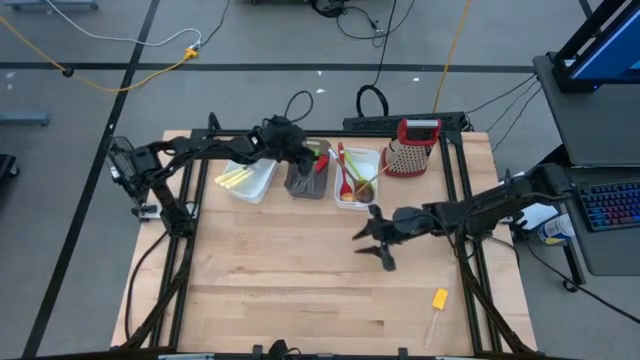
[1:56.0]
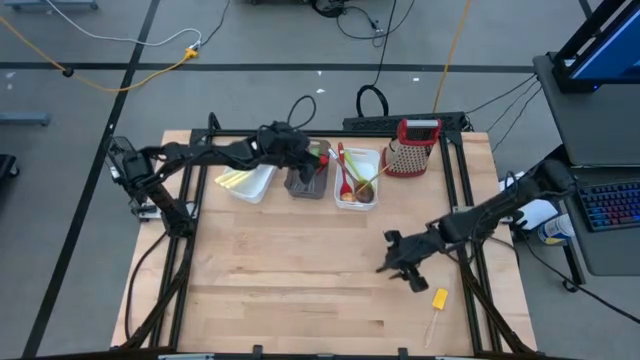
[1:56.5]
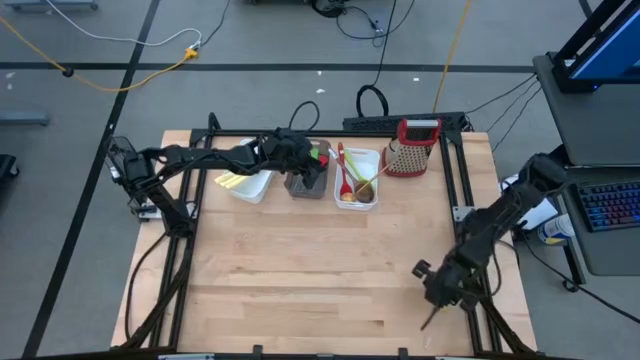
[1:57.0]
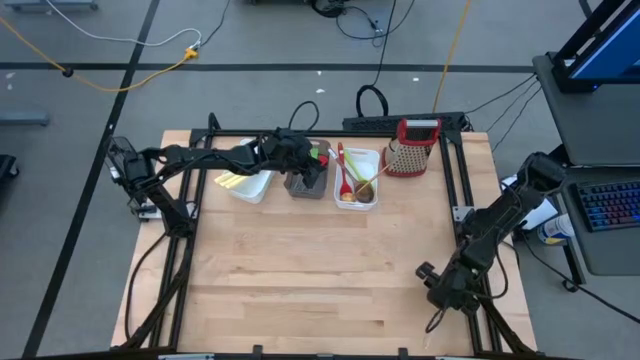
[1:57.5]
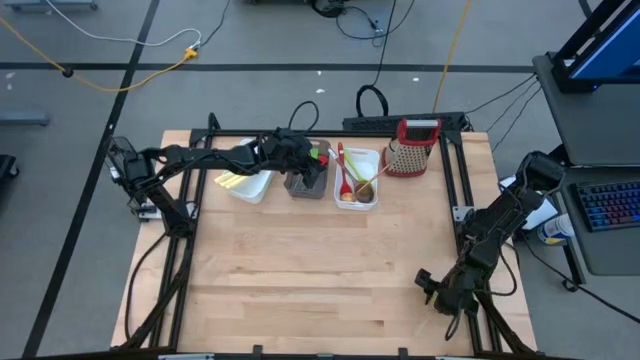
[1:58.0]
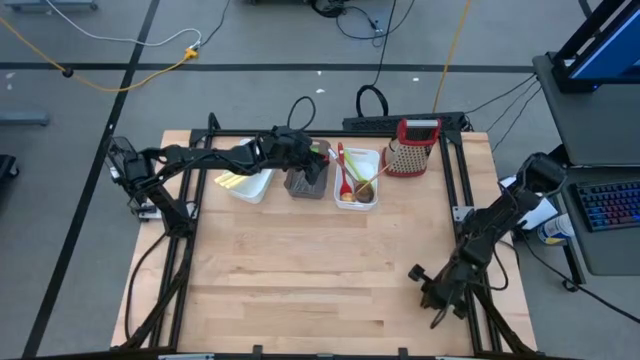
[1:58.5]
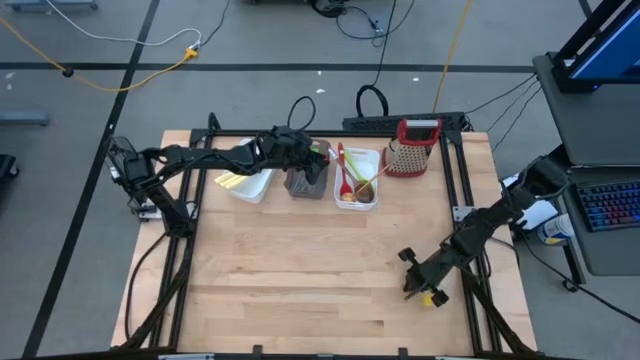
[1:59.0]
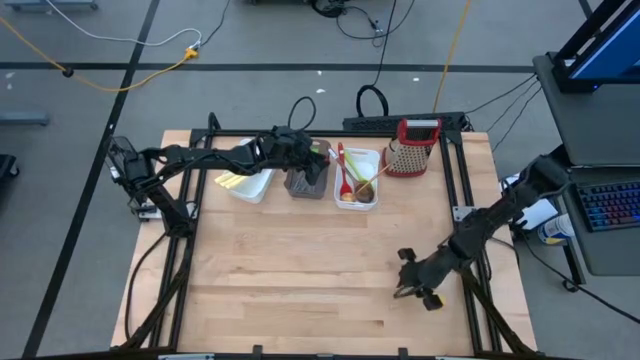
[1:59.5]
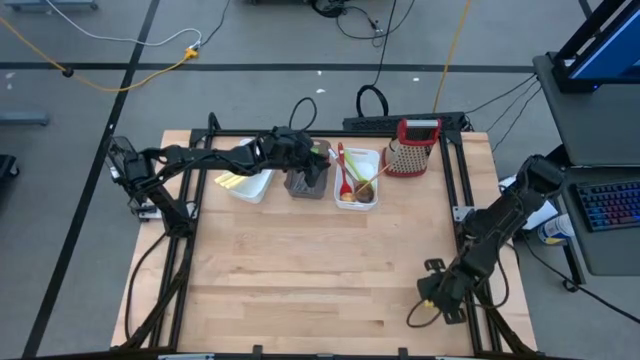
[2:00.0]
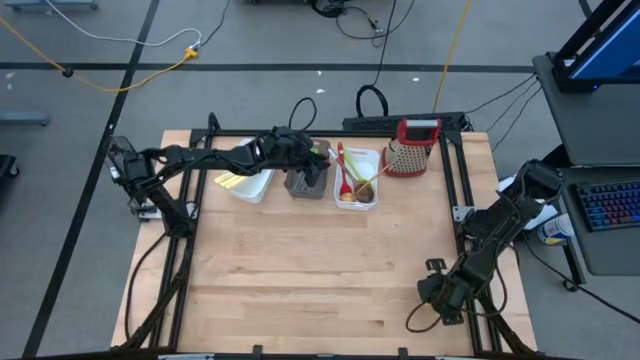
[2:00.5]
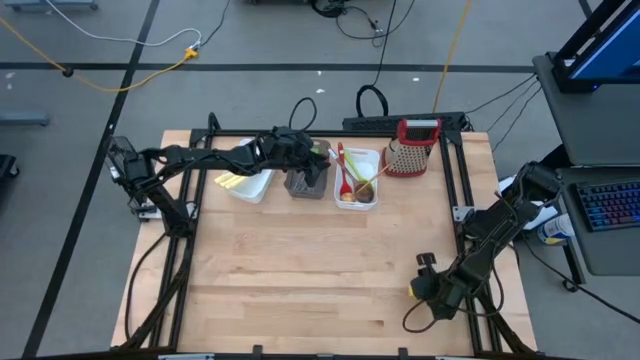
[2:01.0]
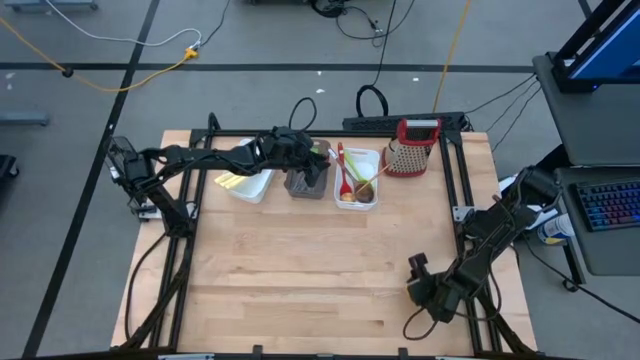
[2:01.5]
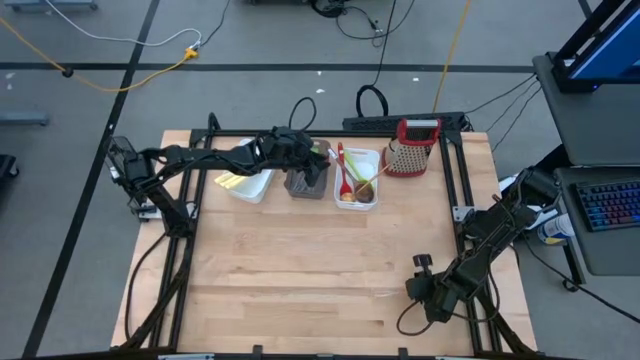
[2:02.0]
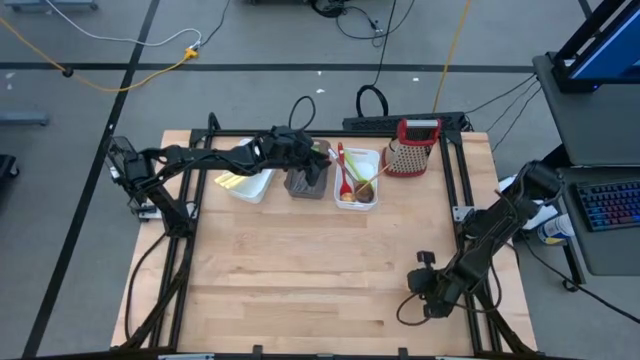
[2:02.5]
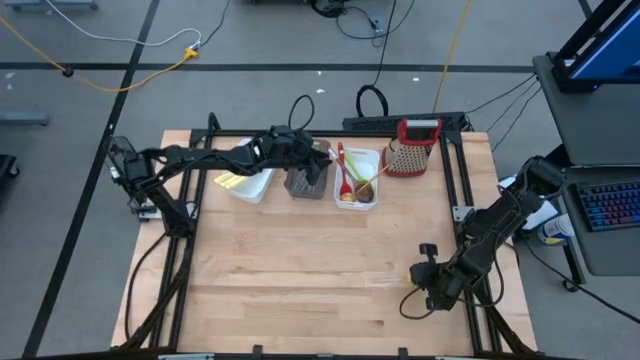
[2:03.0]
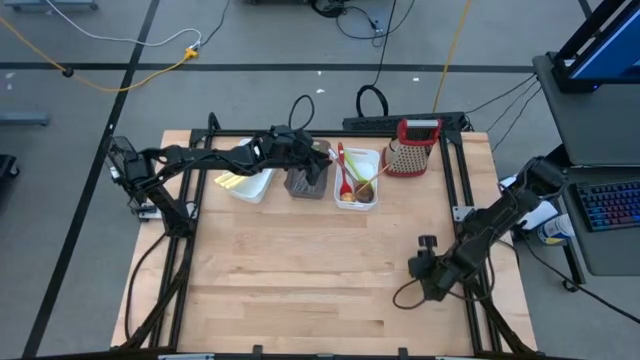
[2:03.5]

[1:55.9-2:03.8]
Task: Pick & Place Kitchen Items
Put the yellow spatula into the black bin

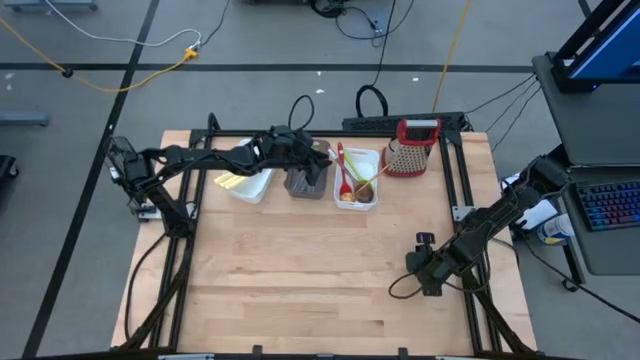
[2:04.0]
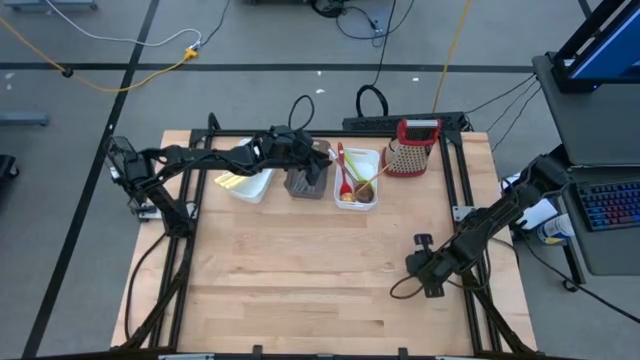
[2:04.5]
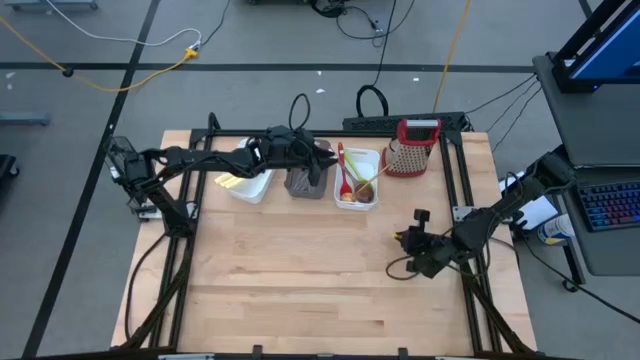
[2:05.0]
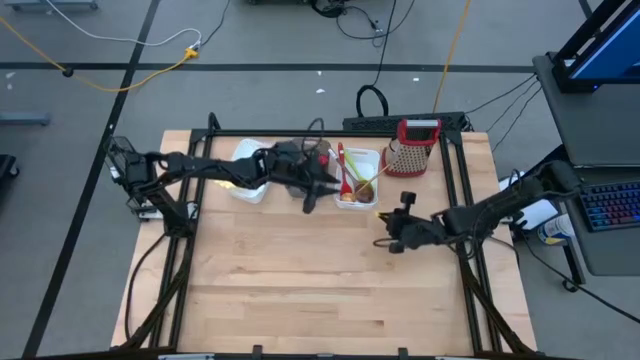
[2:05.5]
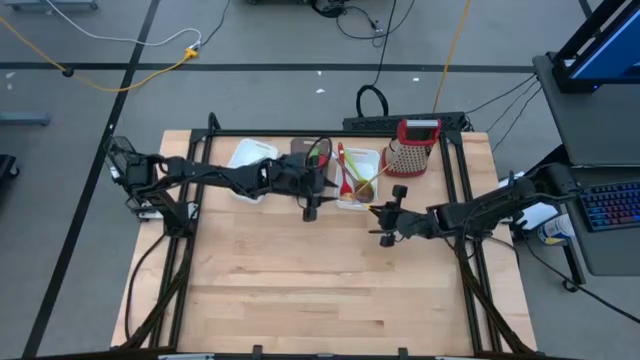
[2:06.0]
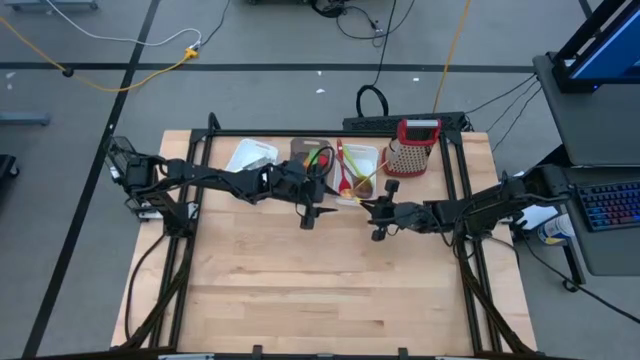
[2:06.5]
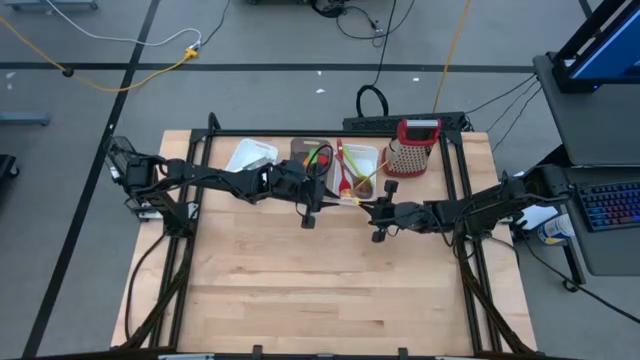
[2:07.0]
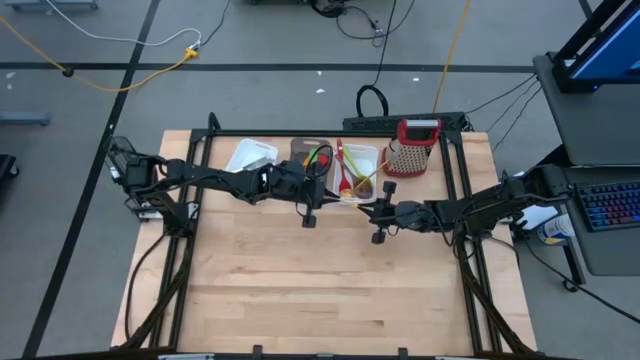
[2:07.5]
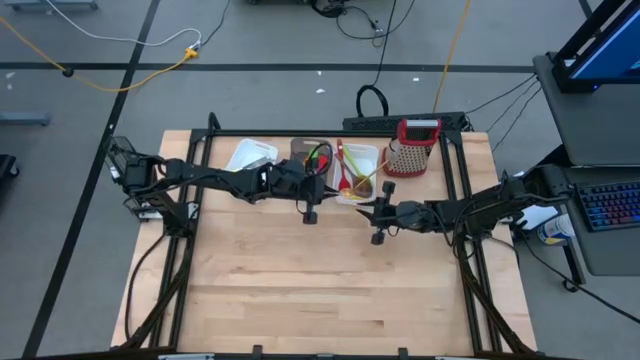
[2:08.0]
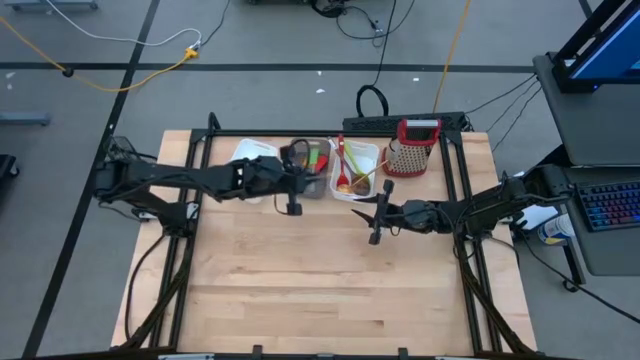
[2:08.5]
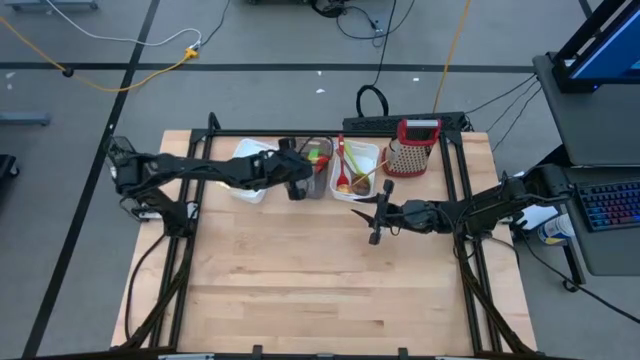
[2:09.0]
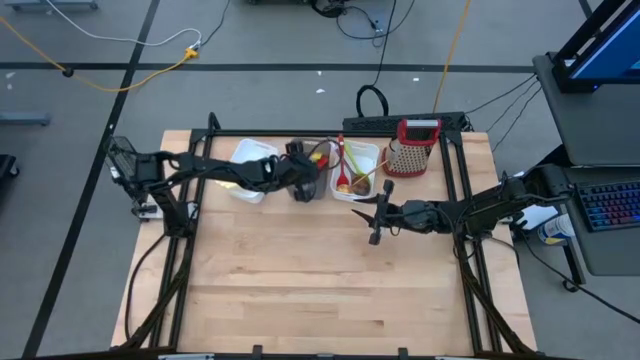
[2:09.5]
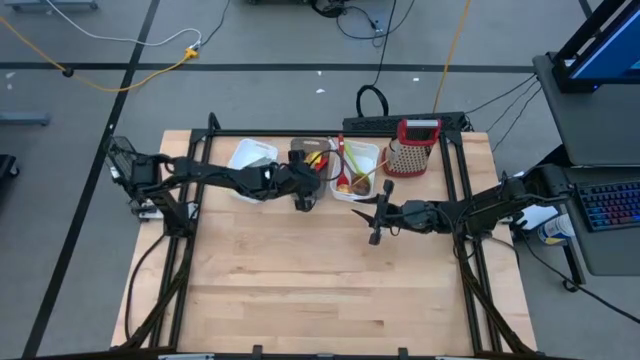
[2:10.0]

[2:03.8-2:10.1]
Put the yellow spatula into the black bin

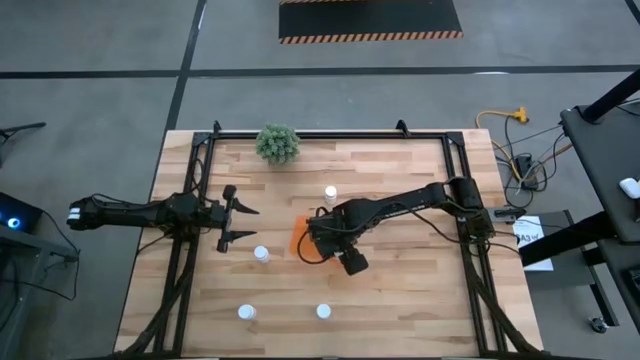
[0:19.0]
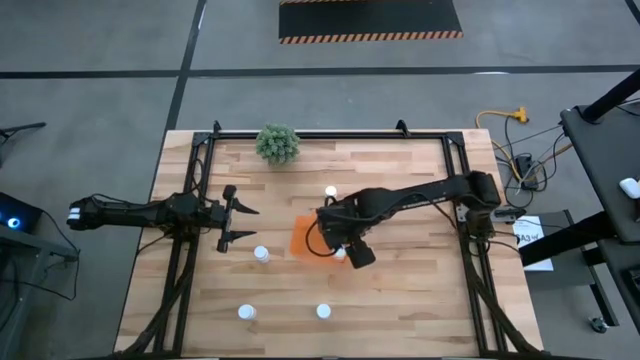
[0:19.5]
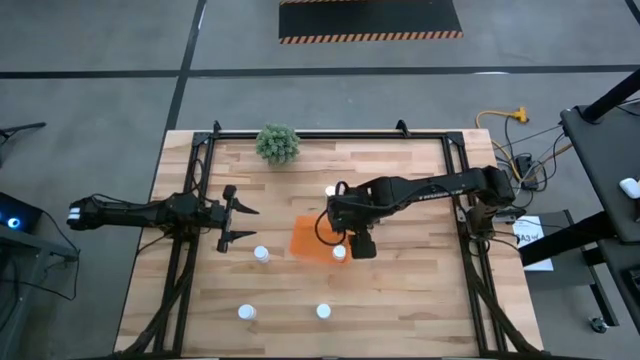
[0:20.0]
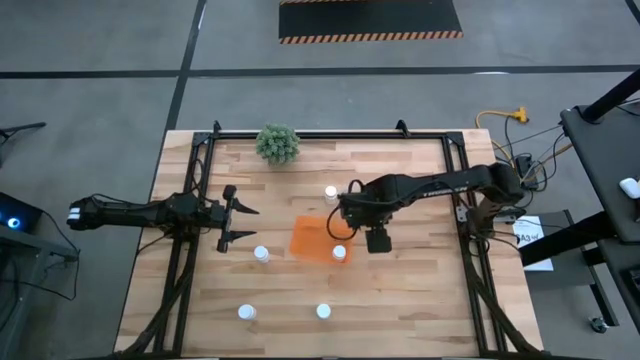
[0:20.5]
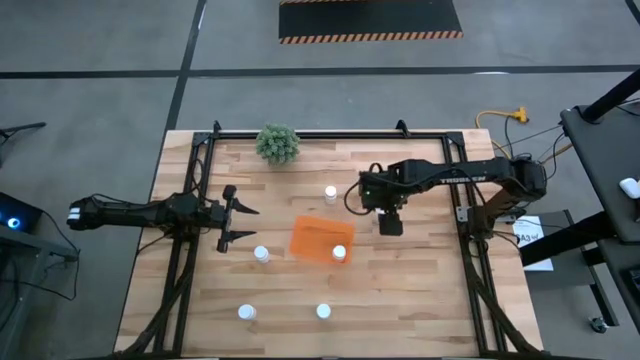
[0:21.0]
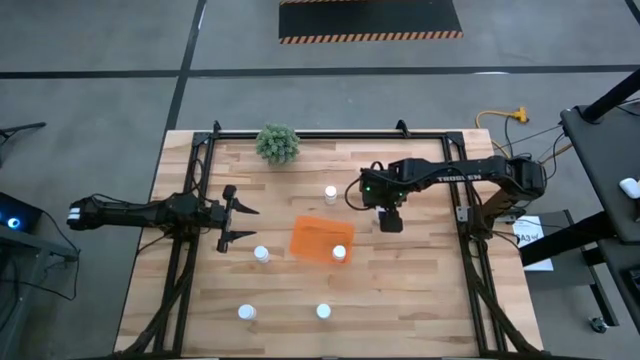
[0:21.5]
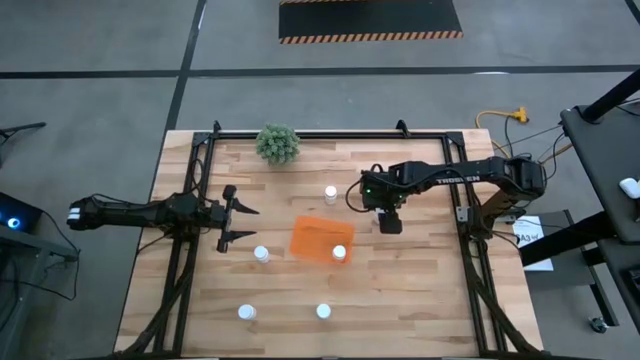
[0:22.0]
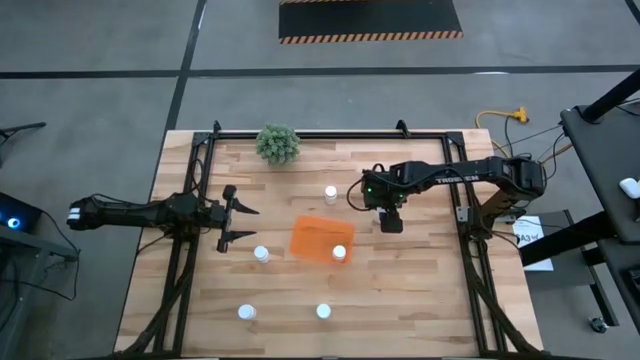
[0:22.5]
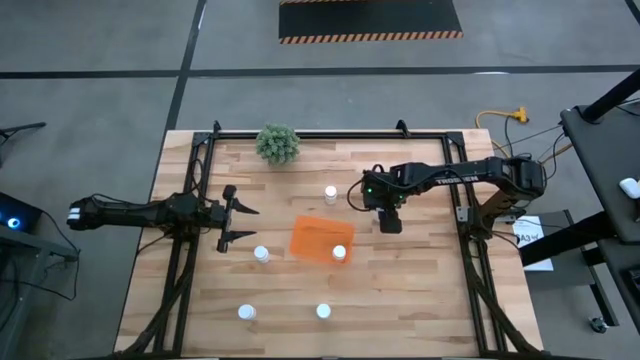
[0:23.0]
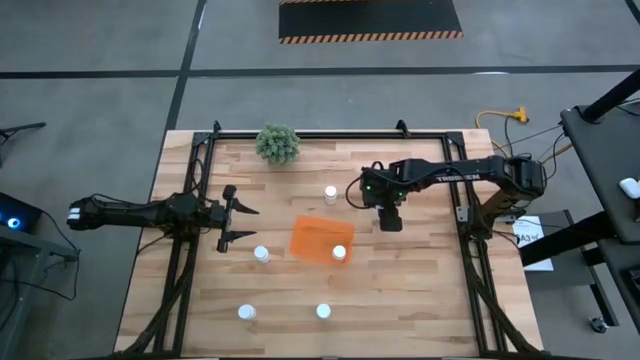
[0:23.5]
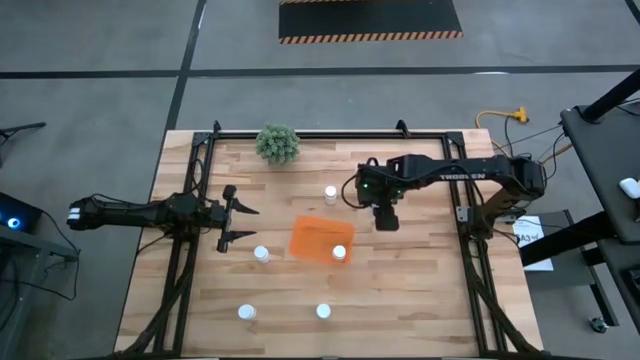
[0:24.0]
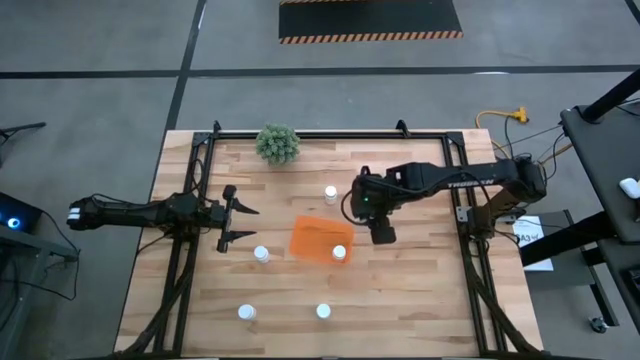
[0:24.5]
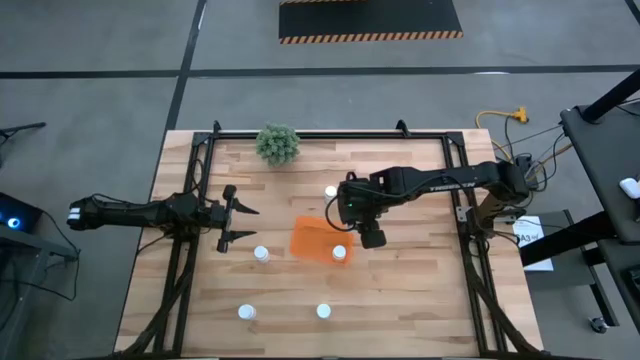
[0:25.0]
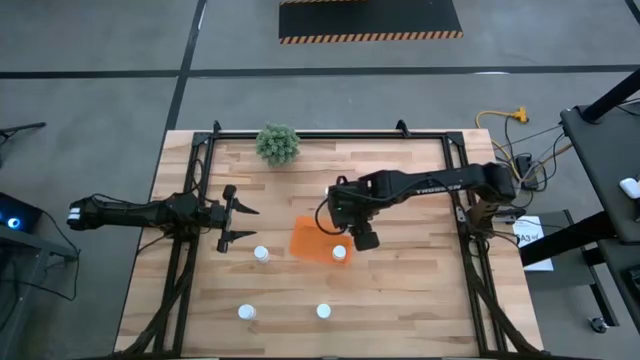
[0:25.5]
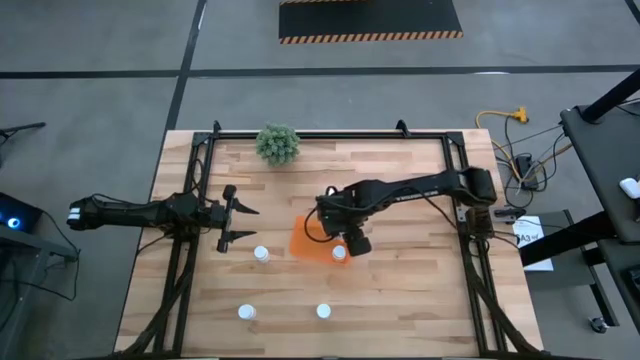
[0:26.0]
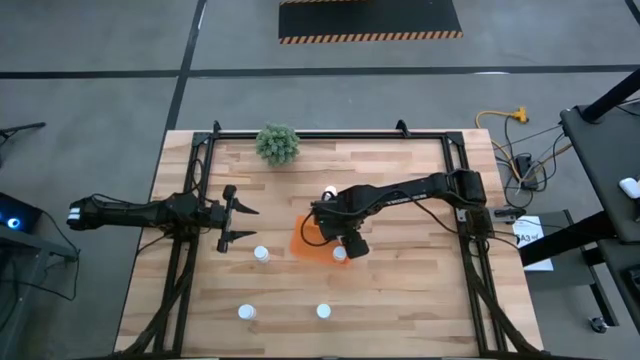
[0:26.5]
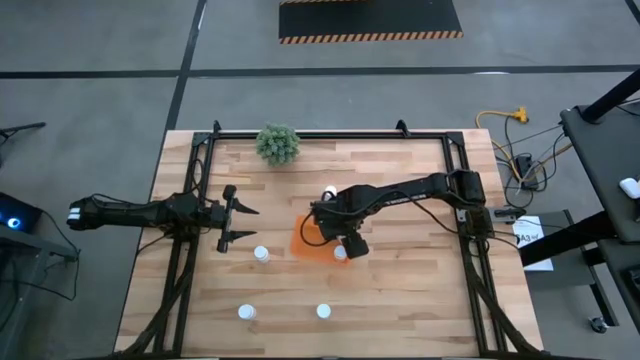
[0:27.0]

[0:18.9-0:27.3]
Task: Pick and place pill bottles into a basket
Put the pill bottle into the bin
